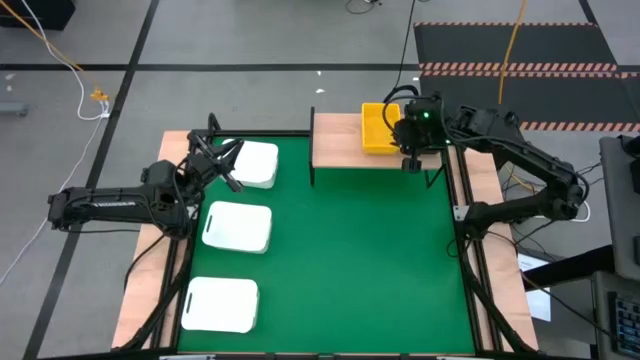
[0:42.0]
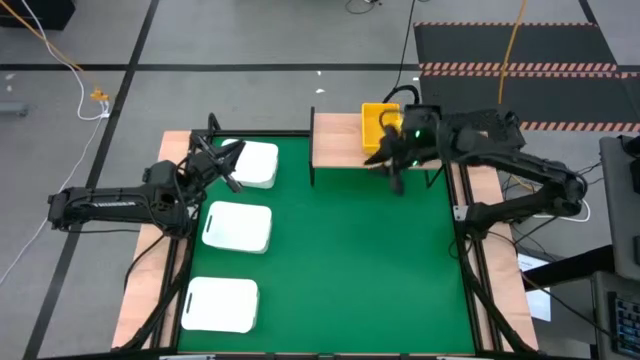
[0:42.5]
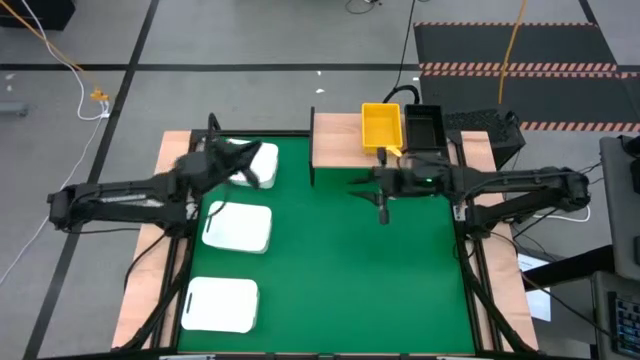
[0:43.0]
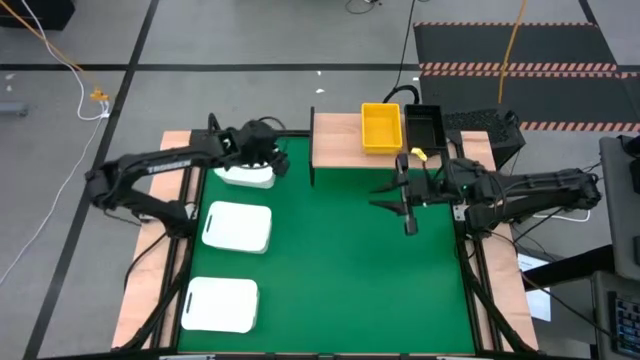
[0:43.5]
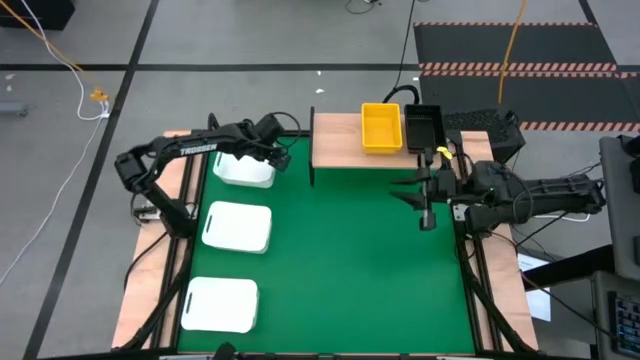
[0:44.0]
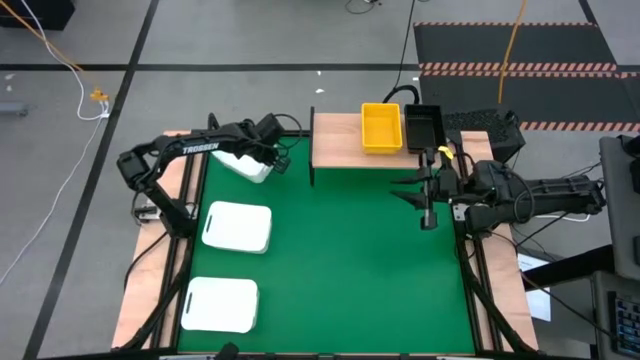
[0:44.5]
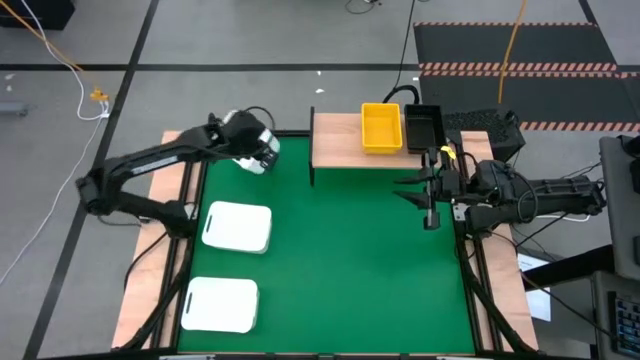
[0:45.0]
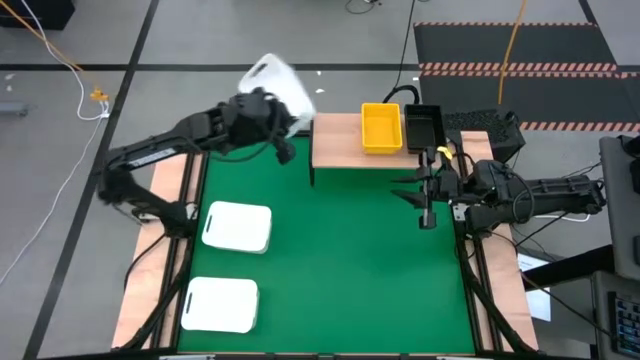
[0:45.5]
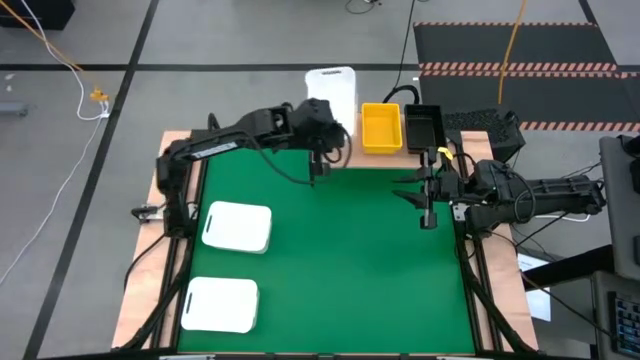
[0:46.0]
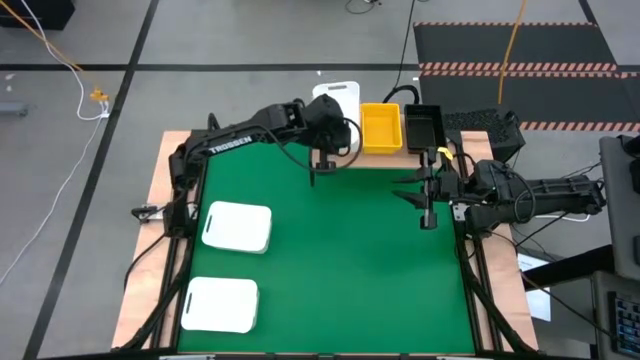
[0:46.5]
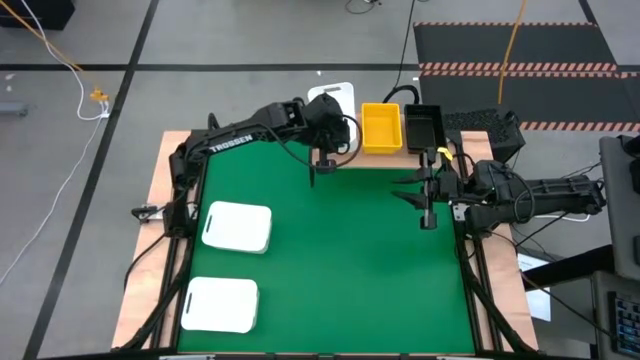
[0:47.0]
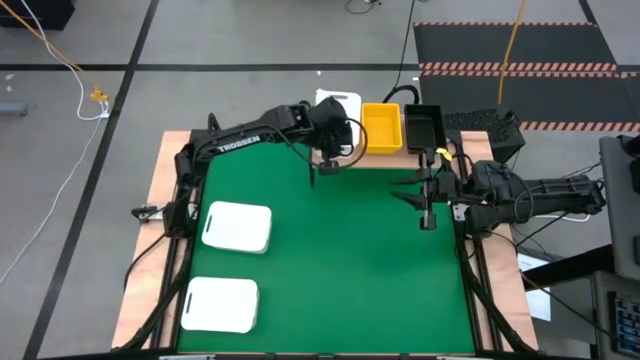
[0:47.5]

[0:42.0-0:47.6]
Task: Stack baskets on shelf by color
Put the top white bin on the shelf

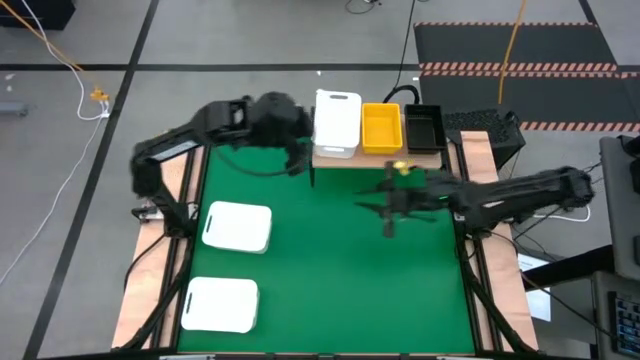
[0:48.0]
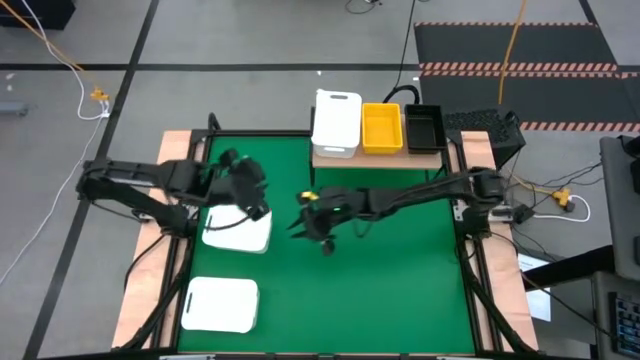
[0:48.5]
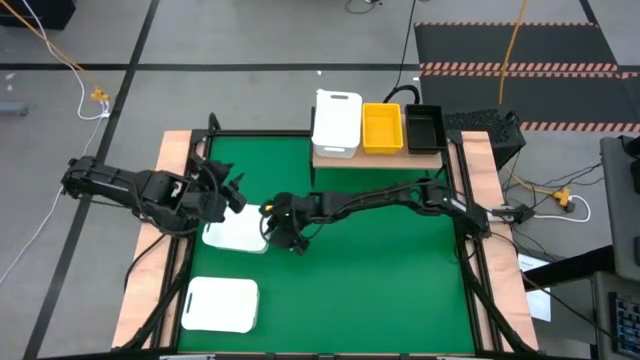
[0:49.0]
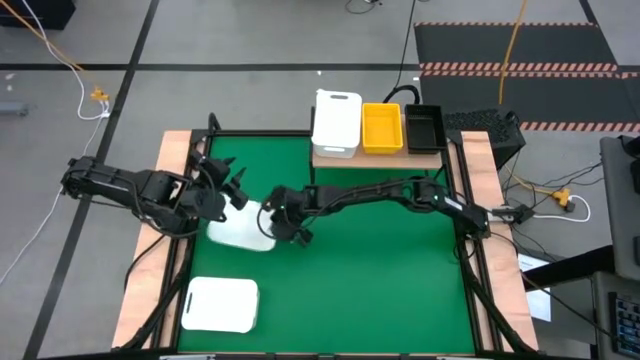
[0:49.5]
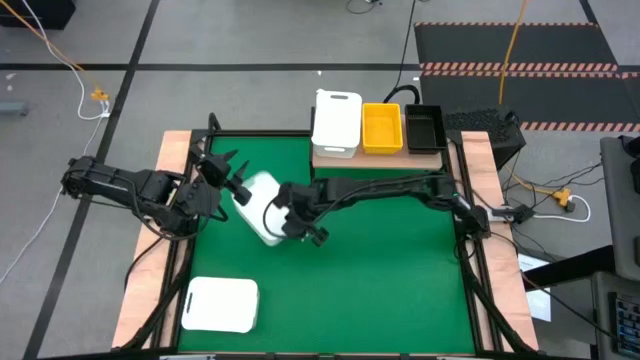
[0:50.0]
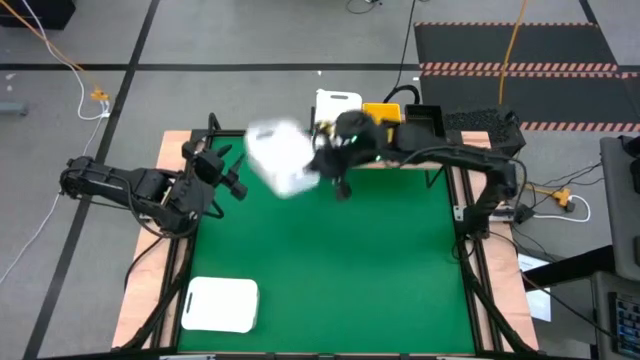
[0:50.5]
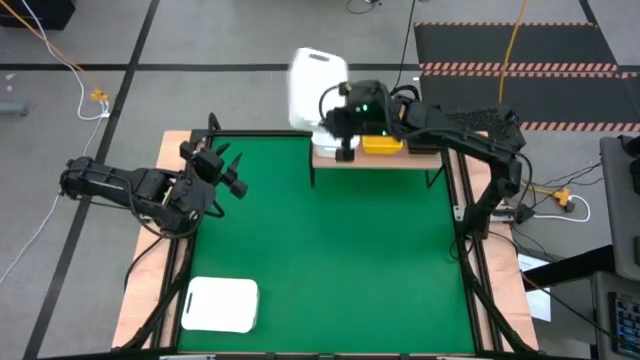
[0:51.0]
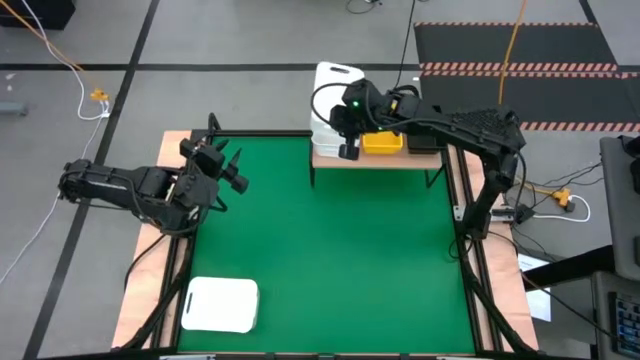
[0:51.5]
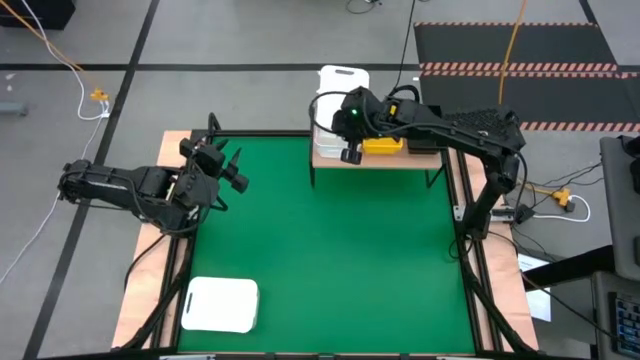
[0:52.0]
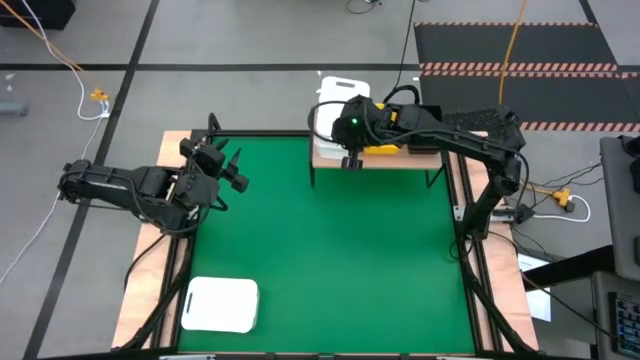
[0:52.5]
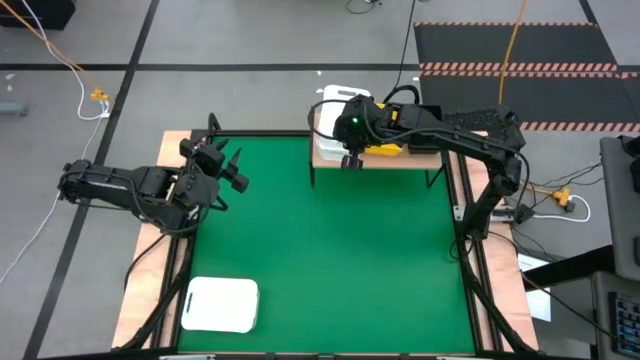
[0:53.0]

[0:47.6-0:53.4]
Stack the top white bin into the other white bin on the shelf

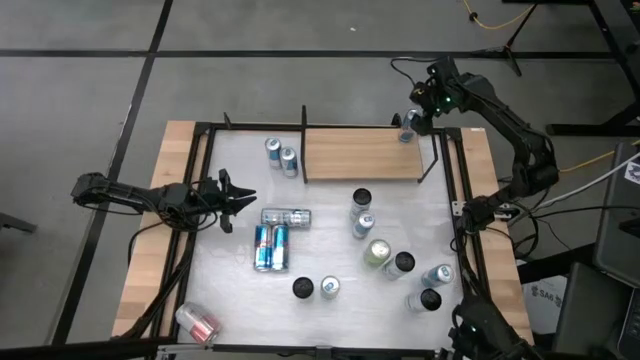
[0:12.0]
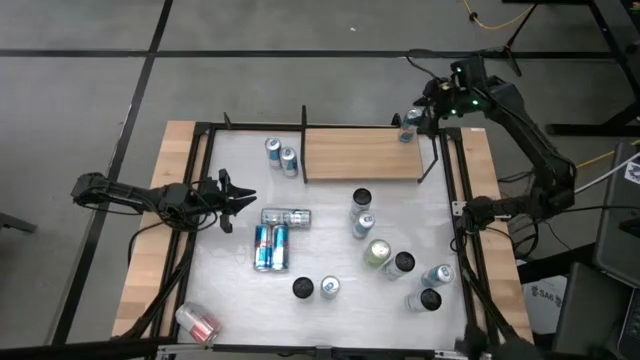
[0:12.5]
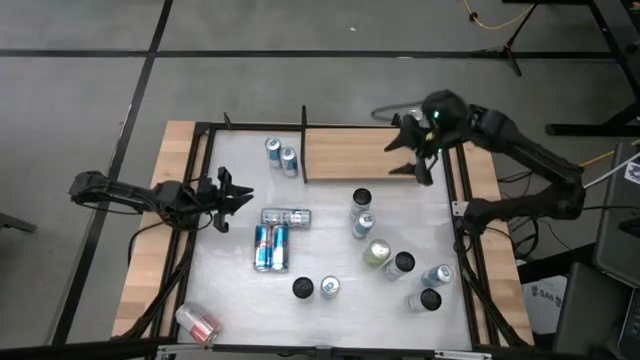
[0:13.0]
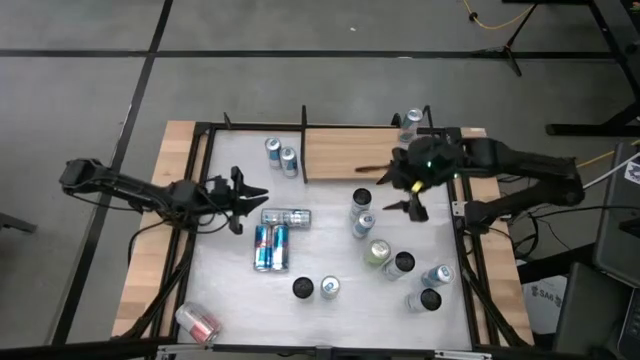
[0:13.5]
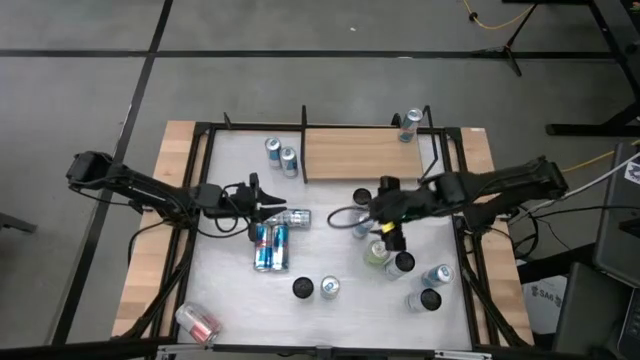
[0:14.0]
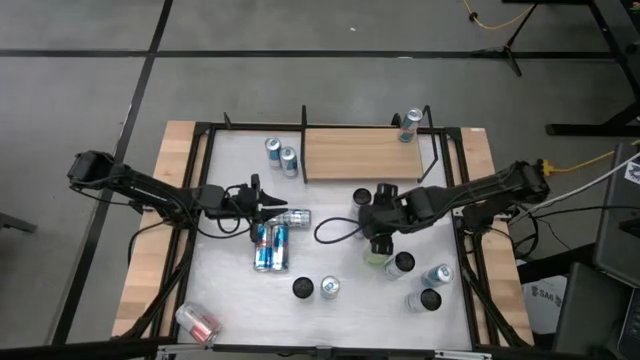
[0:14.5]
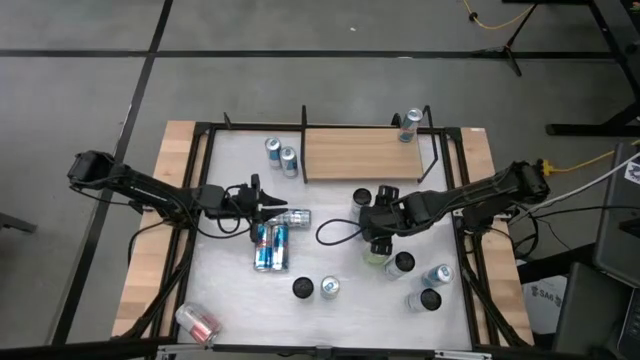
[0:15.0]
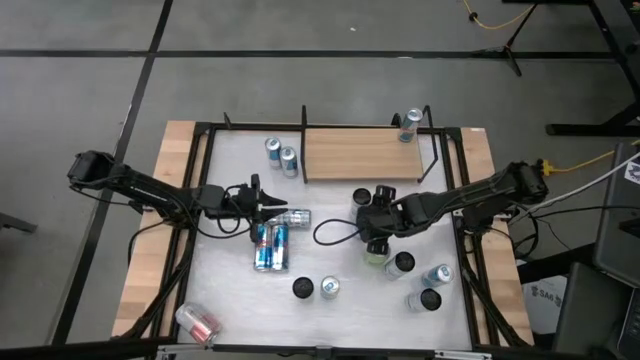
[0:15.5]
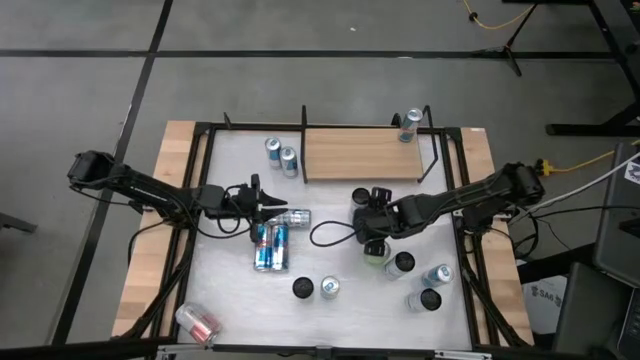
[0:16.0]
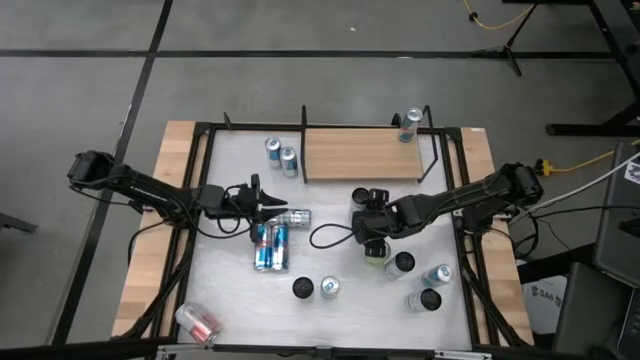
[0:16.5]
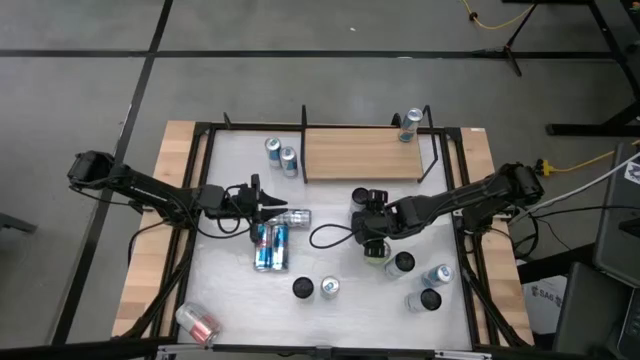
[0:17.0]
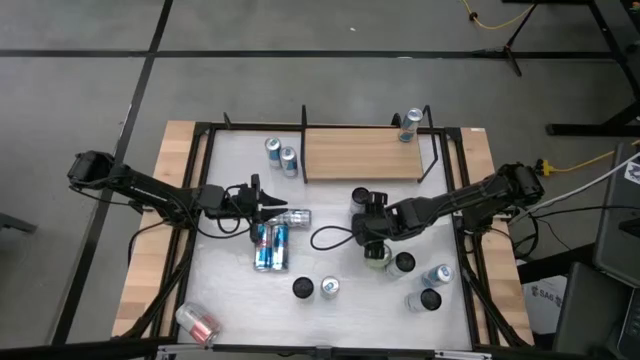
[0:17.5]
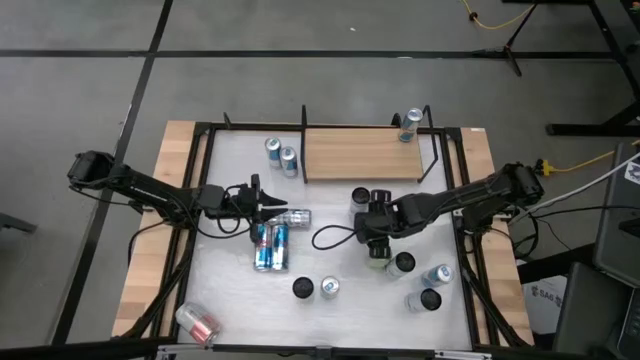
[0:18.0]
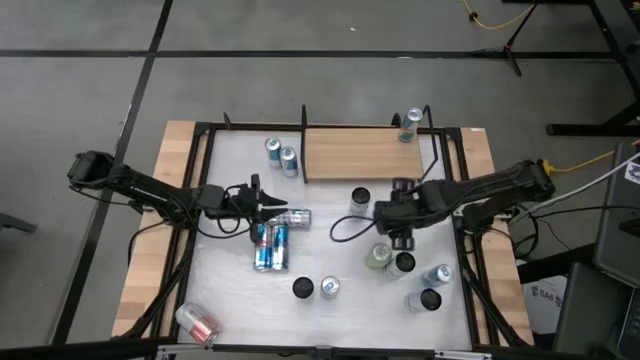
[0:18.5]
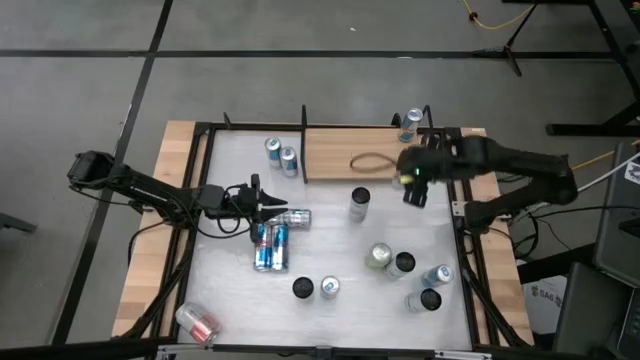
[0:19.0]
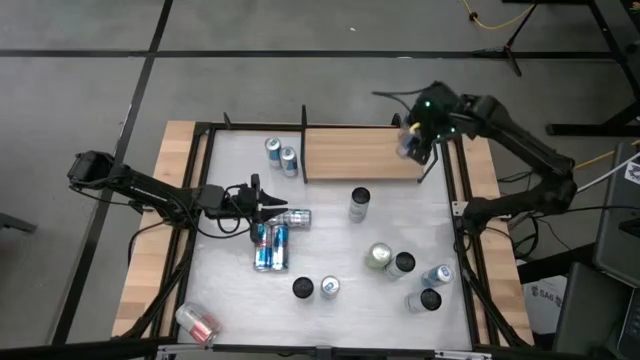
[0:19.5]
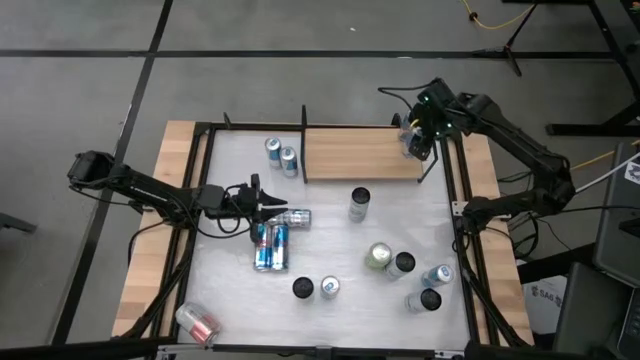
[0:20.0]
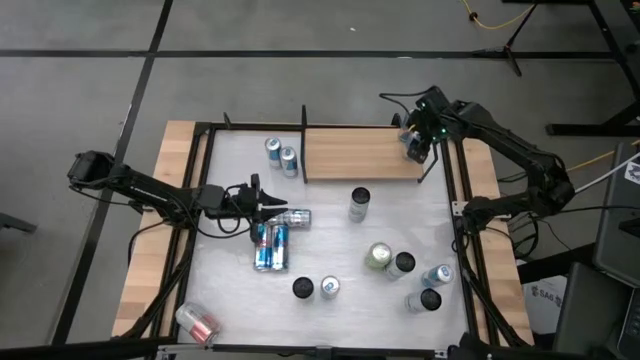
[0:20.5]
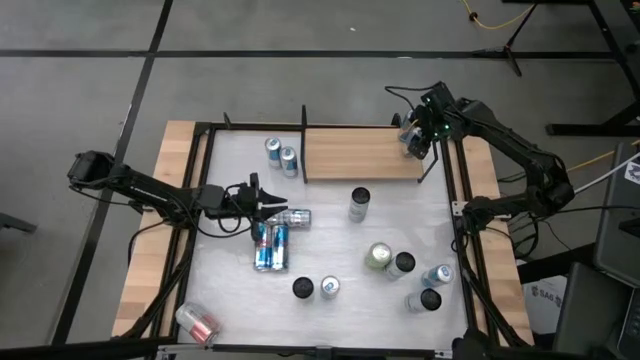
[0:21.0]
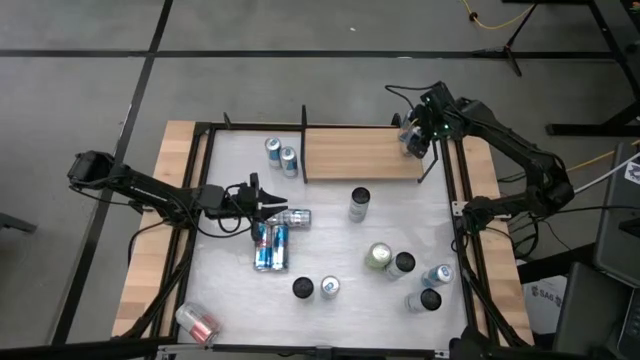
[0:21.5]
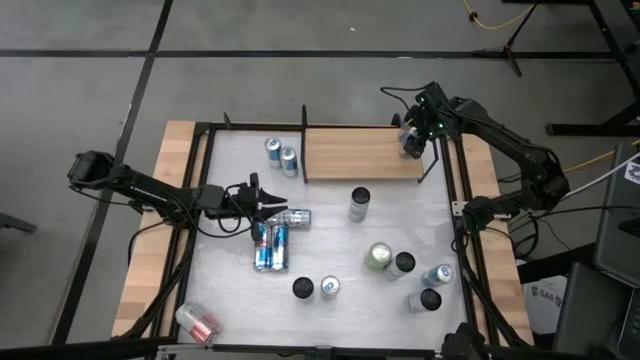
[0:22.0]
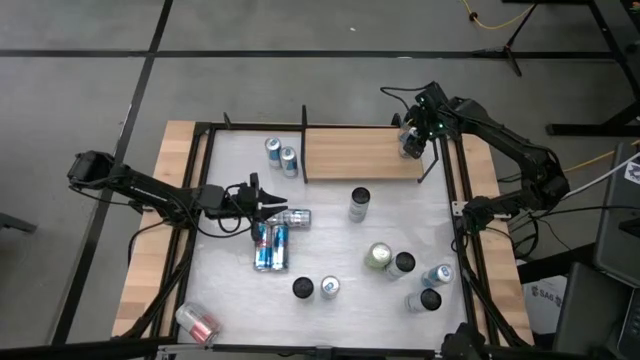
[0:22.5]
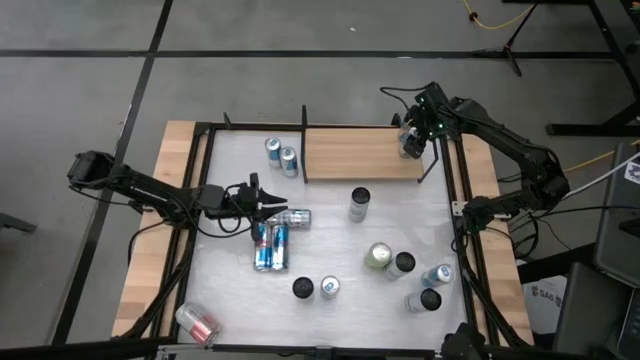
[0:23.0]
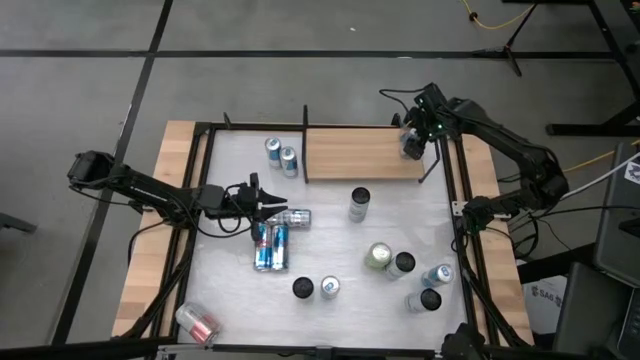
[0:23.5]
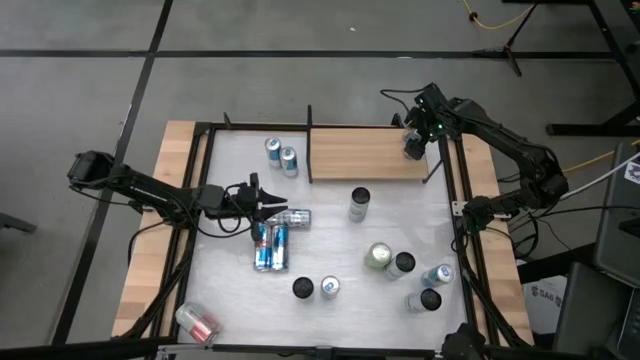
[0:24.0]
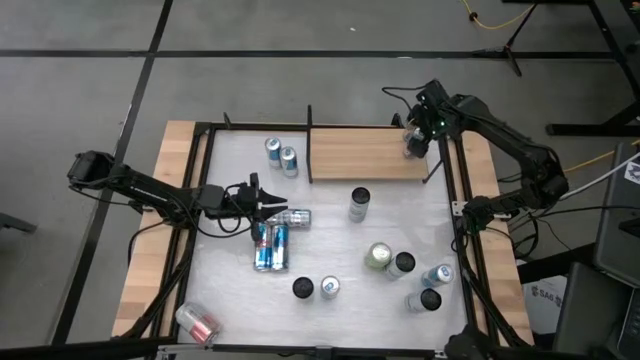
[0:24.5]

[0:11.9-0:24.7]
Task: Place canned beverage on shelf
Put the blue soda can on the shelf aligned with the other blue soda can
